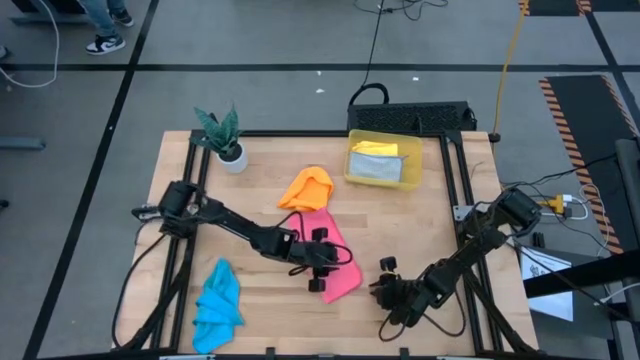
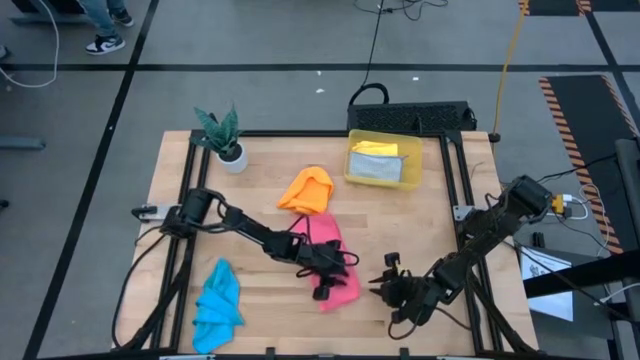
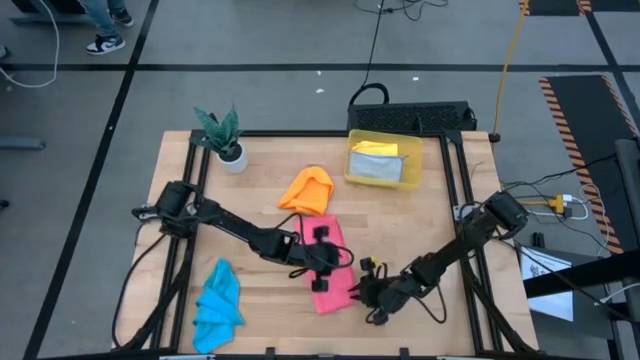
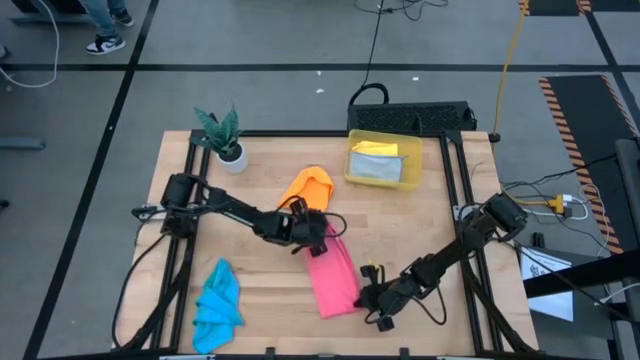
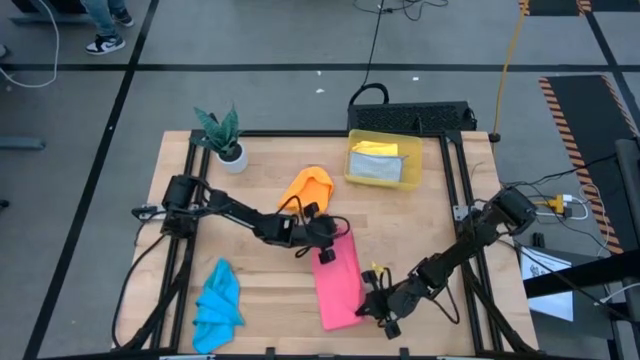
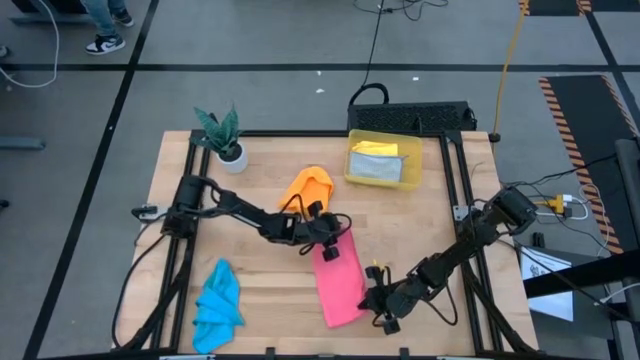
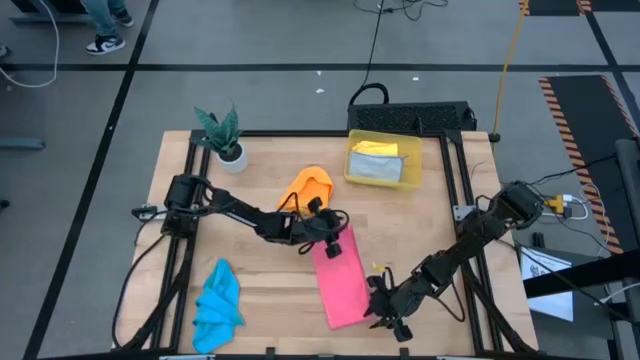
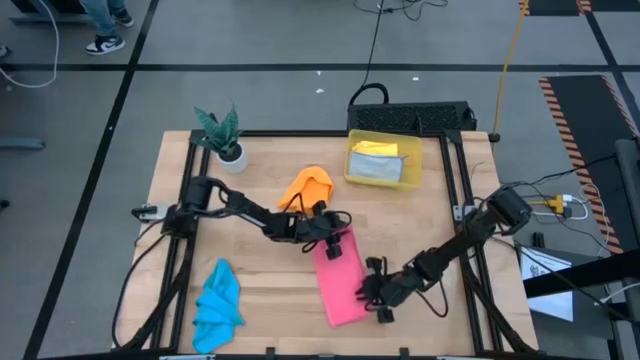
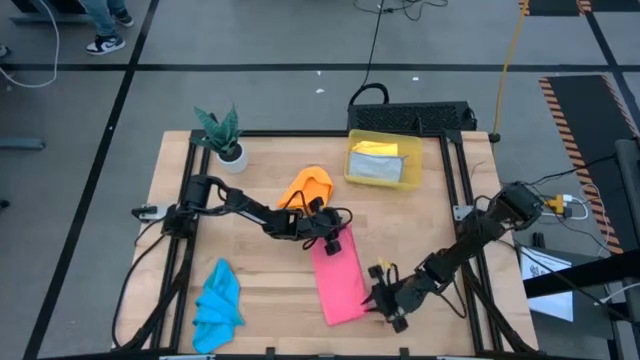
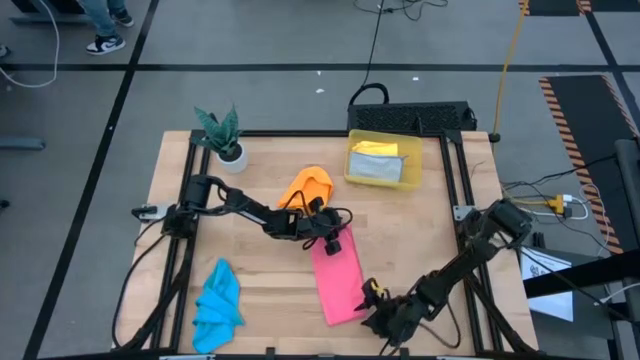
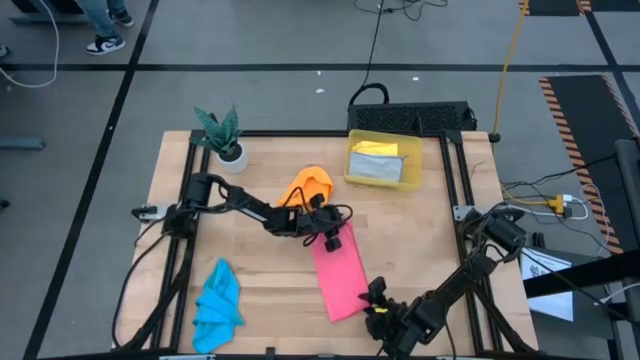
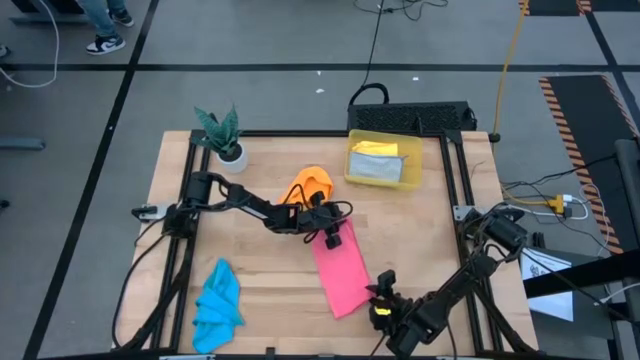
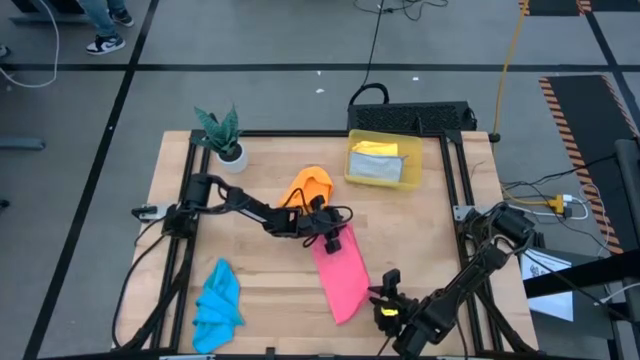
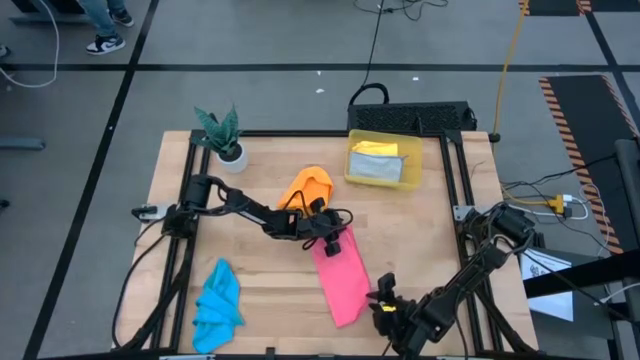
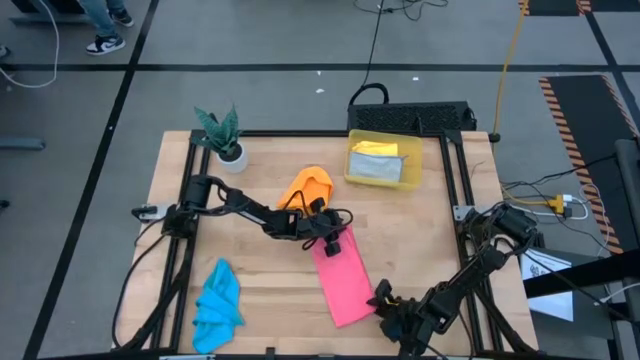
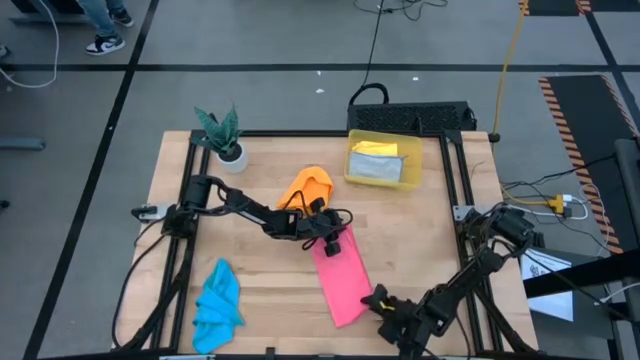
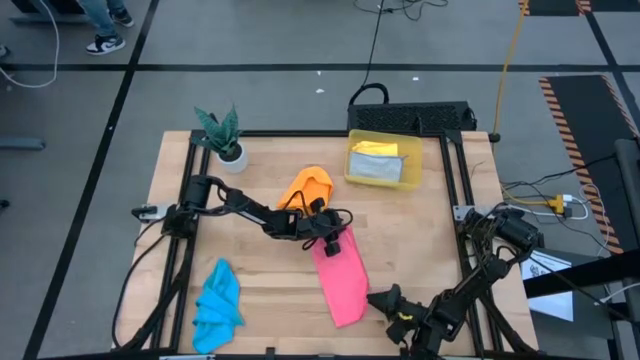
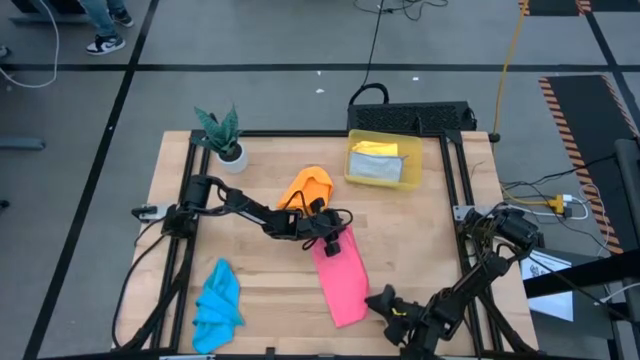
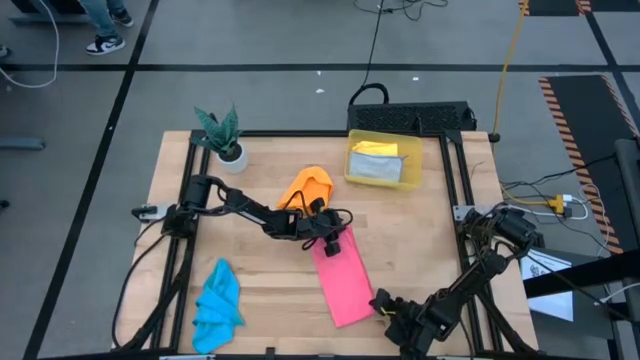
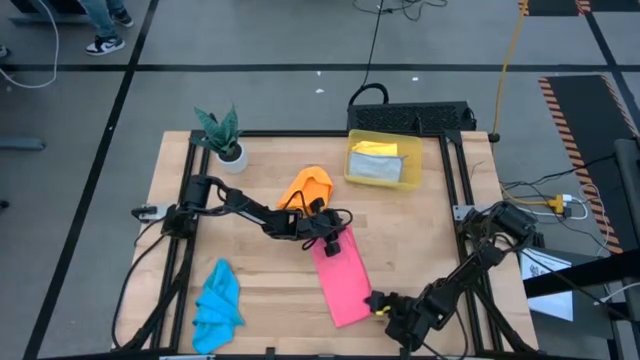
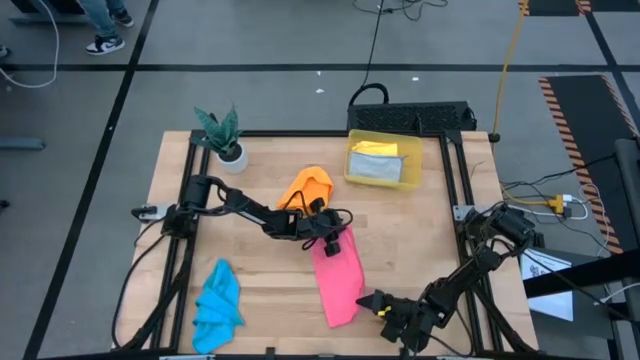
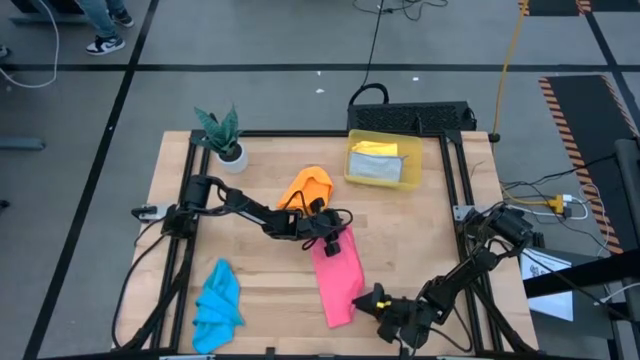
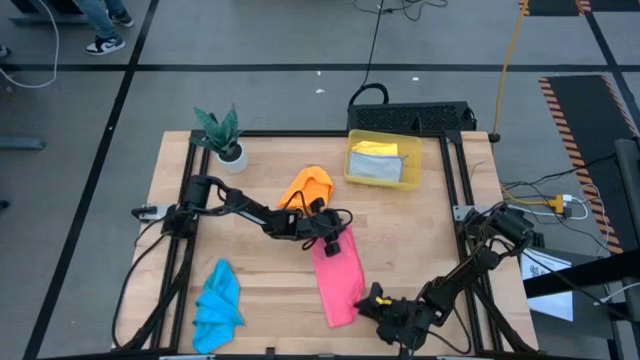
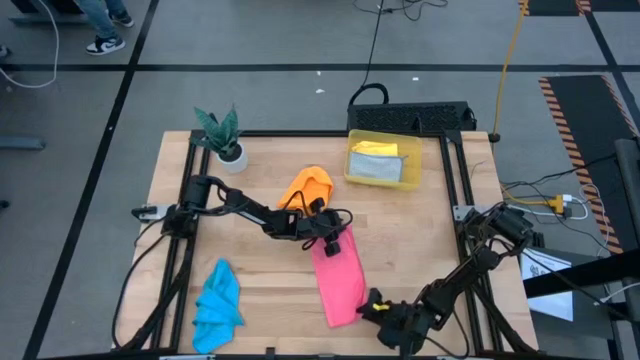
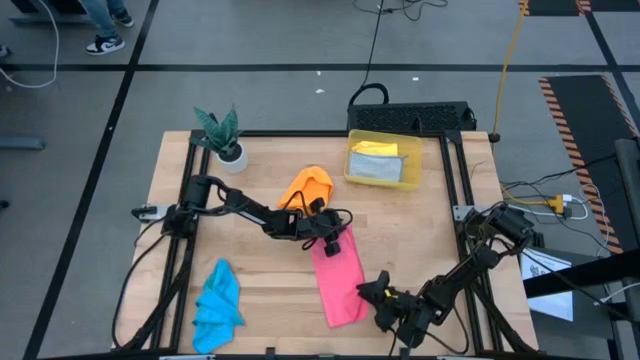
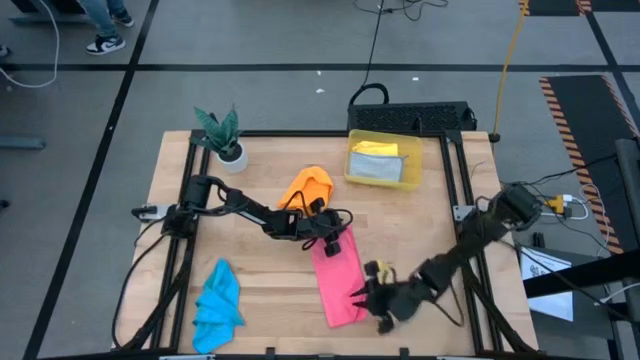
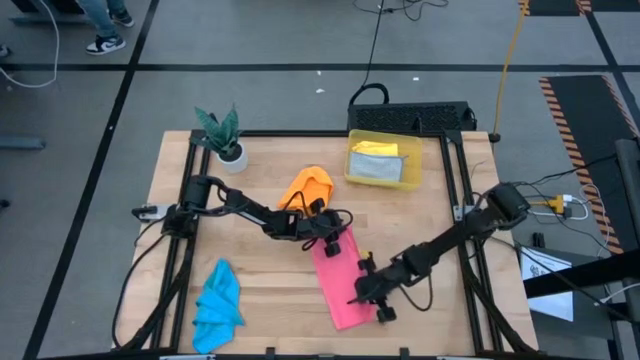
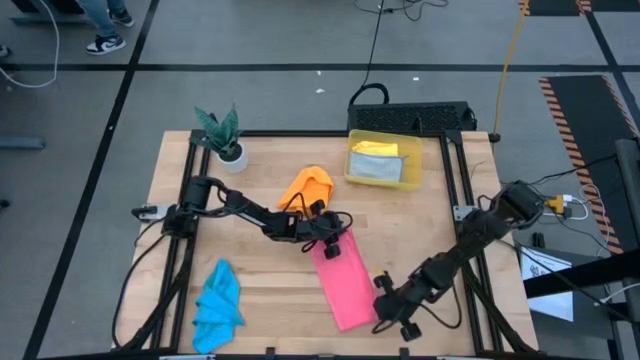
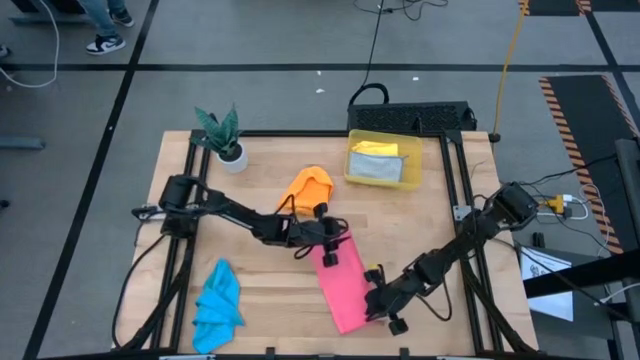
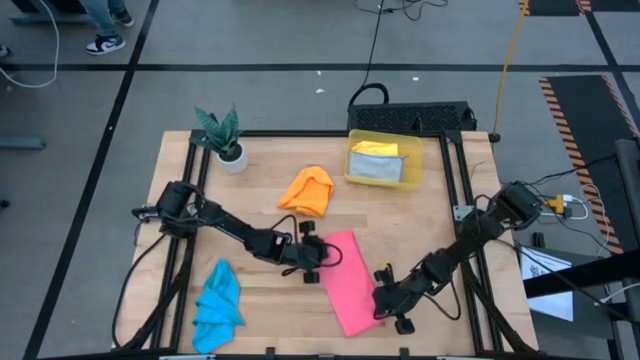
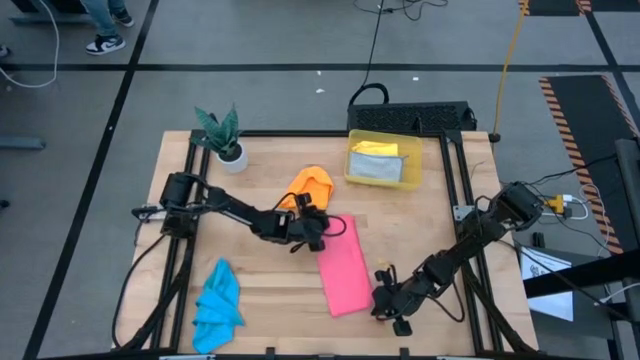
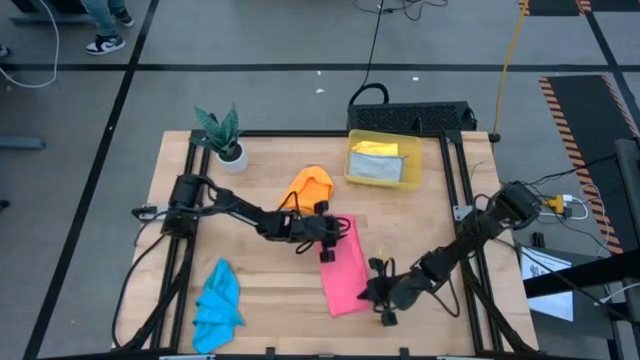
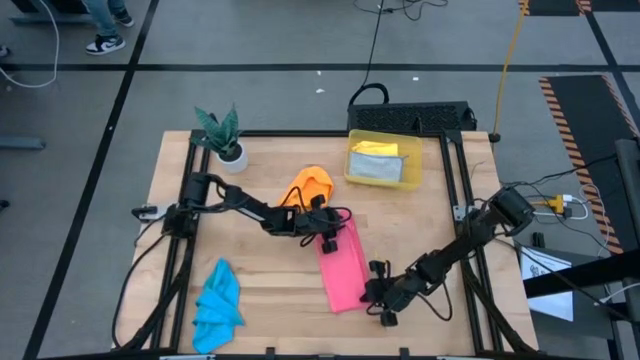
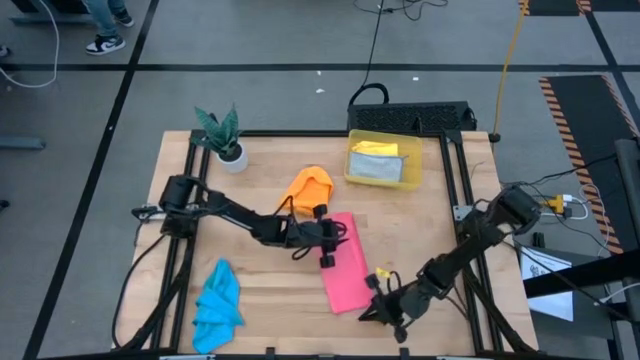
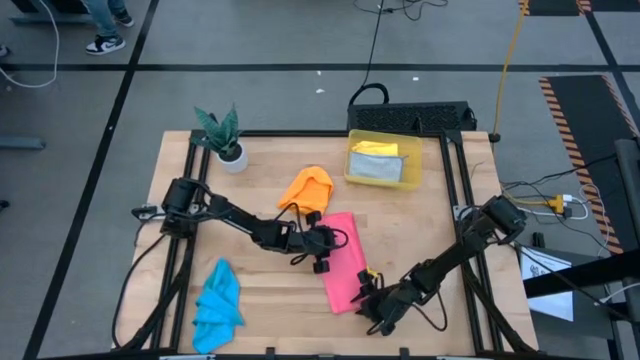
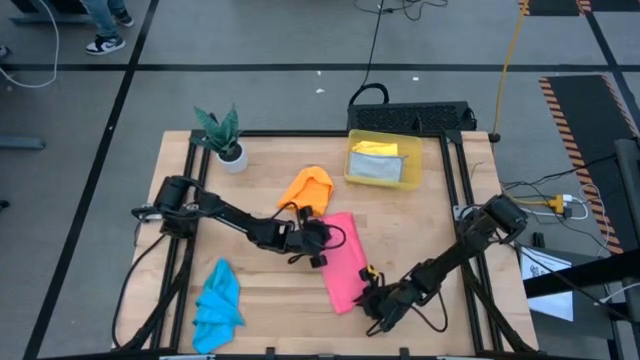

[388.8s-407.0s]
Task: Fold microfiber towels
Fold the pink kitchen towel
